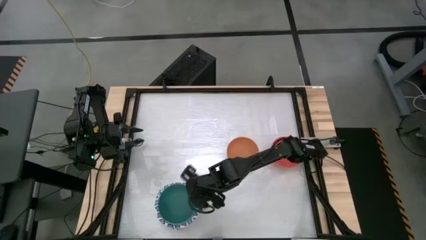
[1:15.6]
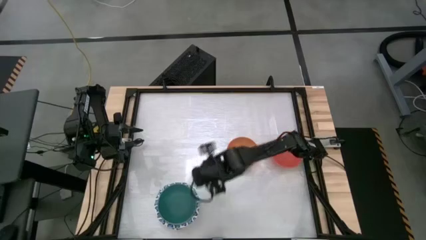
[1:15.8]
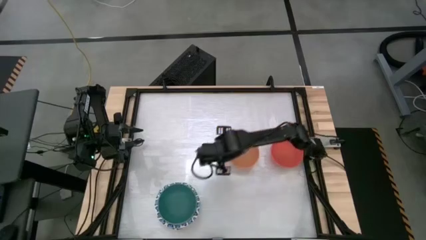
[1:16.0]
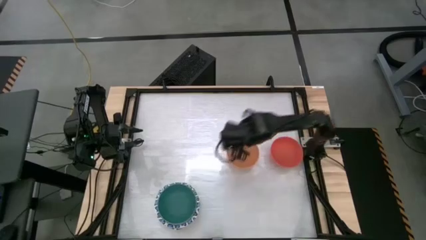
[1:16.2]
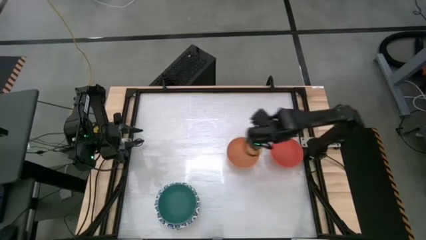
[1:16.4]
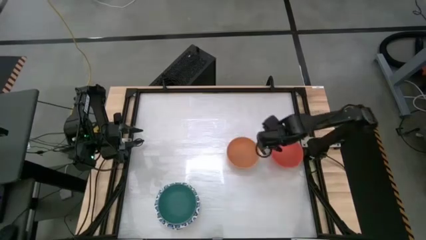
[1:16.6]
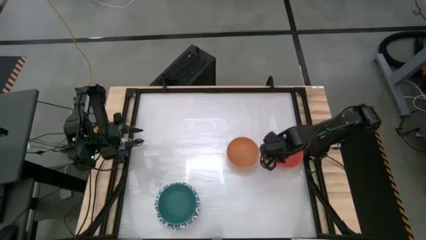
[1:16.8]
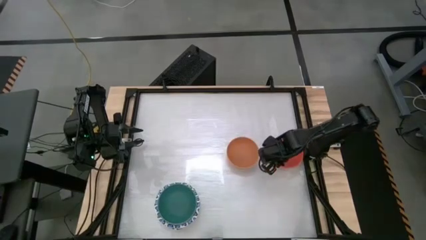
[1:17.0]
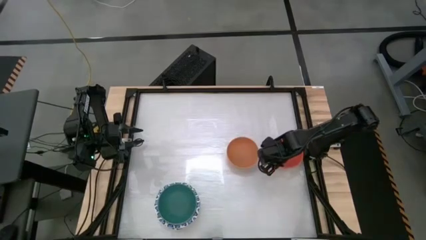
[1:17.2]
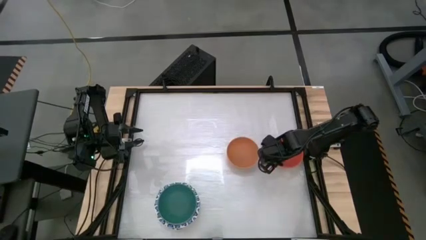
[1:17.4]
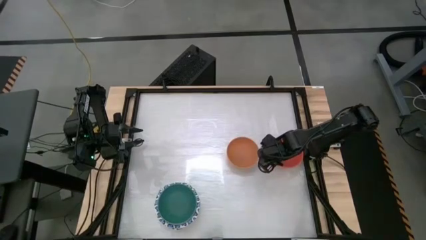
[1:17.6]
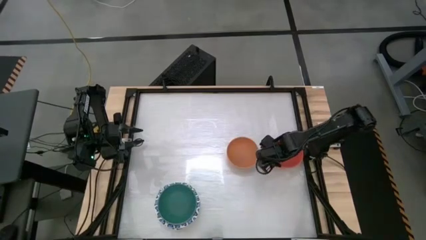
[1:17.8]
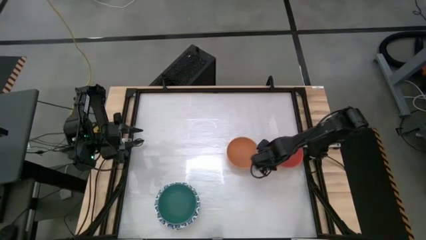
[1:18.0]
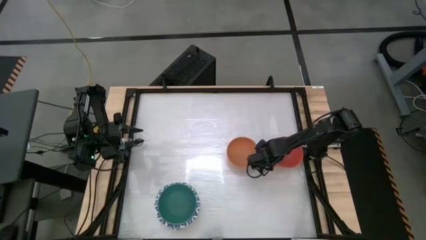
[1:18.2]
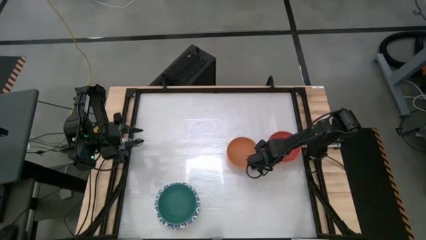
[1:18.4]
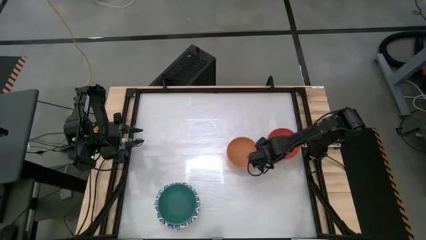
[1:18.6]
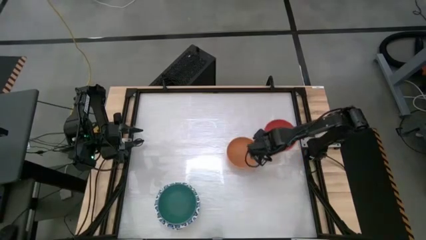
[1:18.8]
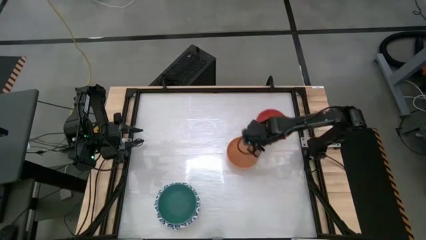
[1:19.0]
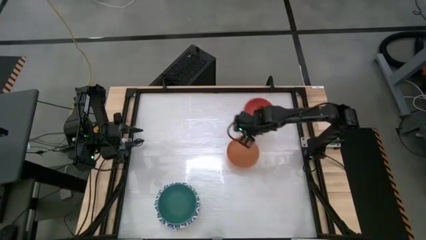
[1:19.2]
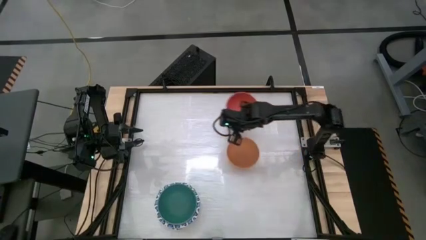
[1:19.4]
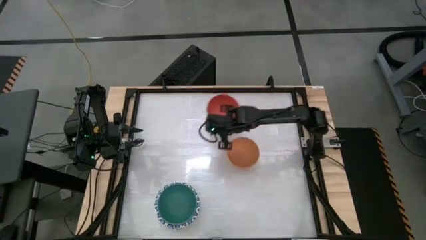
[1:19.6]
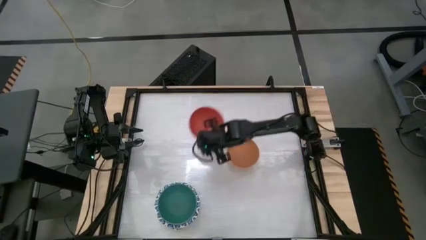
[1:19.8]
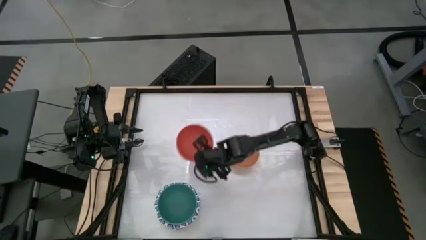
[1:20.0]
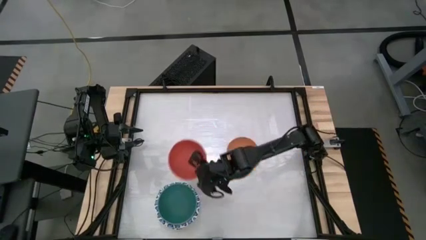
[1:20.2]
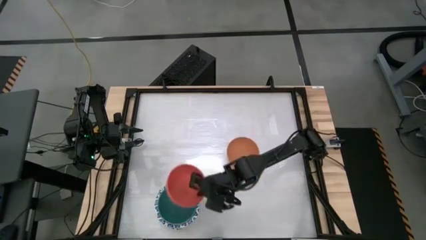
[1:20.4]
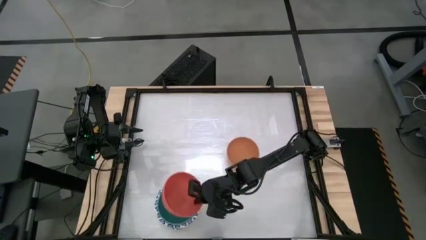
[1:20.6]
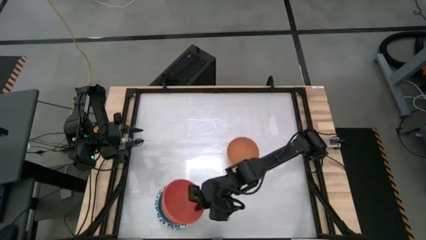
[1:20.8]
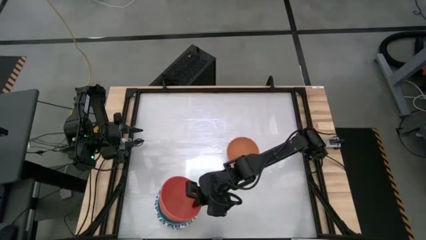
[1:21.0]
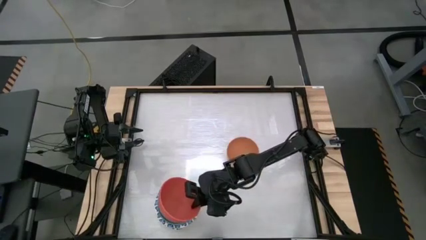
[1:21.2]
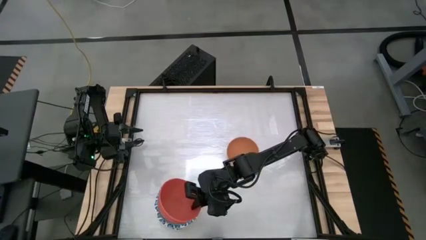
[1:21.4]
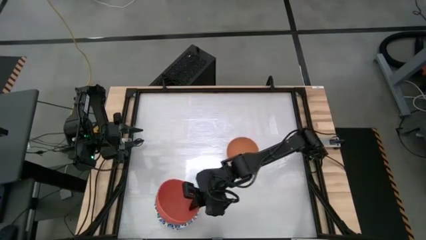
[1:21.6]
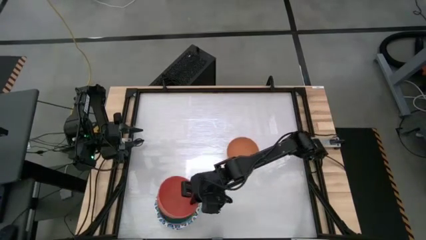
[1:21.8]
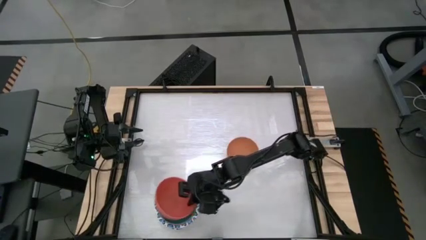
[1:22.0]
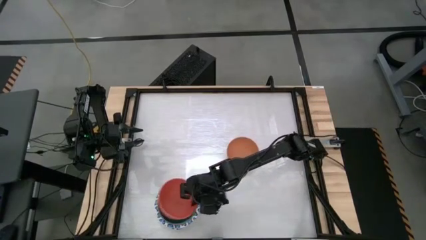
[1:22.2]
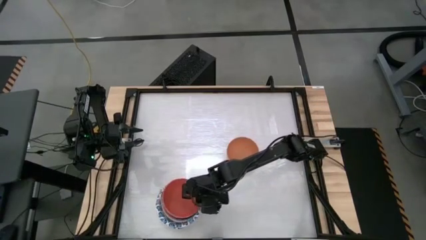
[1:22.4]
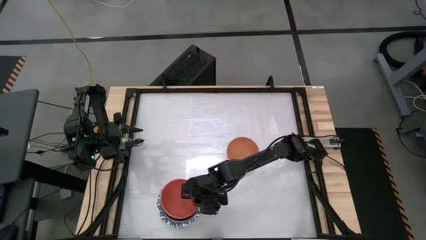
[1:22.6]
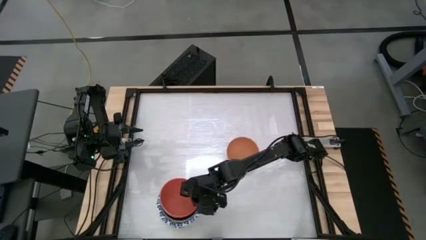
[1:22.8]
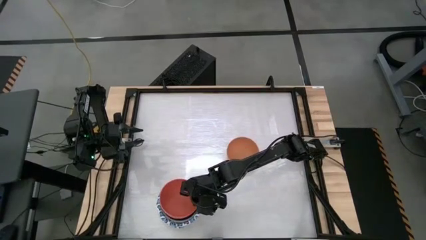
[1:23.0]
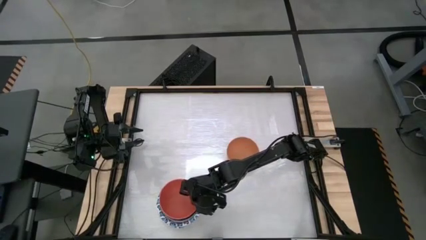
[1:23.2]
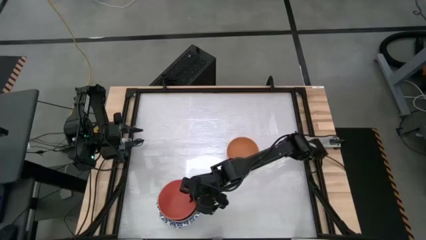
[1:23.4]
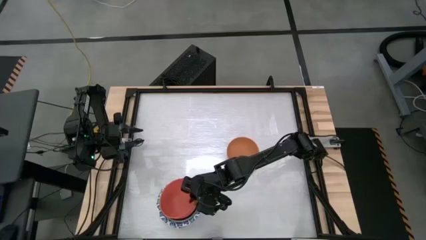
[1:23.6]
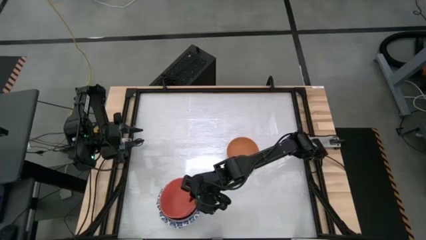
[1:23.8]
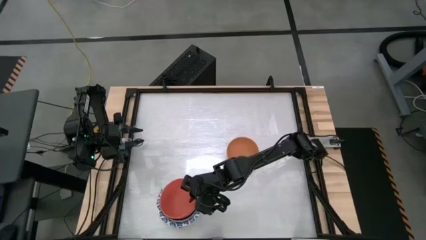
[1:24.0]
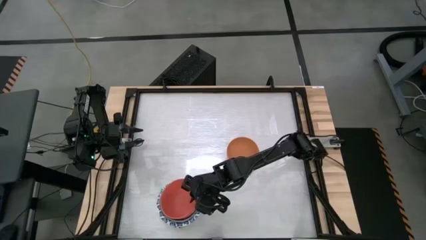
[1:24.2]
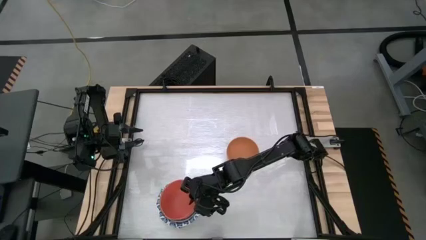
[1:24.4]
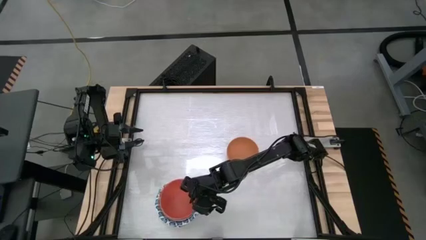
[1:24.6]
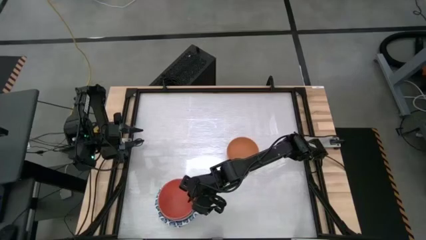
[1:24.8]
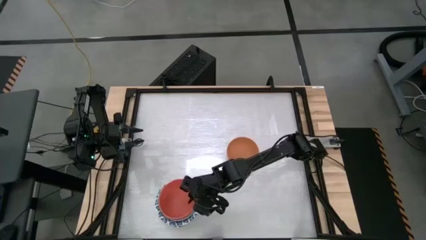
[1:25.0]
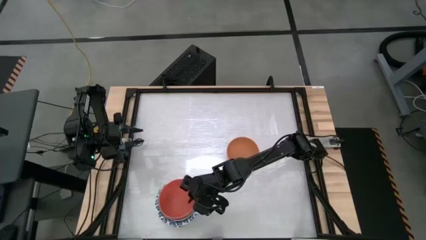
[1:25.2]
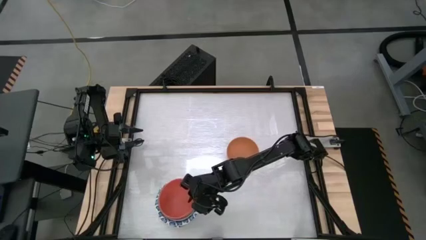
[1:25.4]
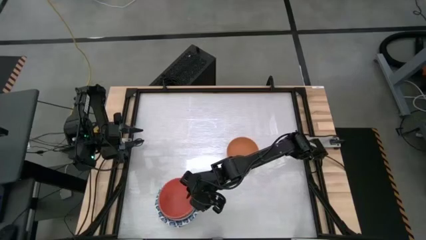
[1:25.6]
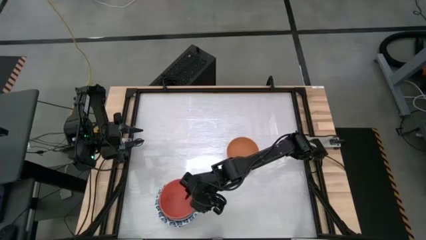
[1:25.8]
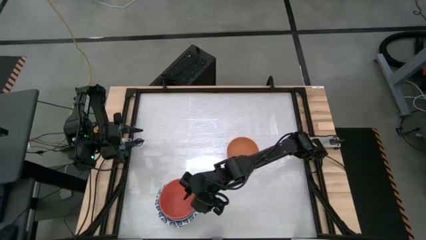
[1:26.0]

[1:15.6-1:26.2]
Stack the orange bowl on top of the other green bowl

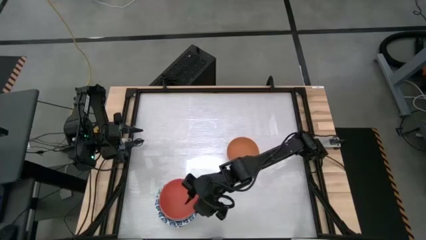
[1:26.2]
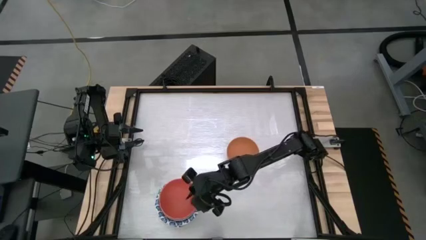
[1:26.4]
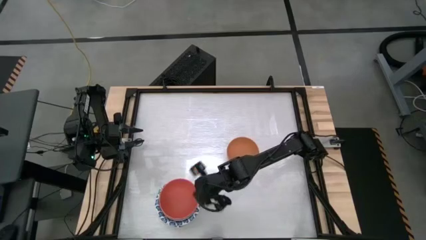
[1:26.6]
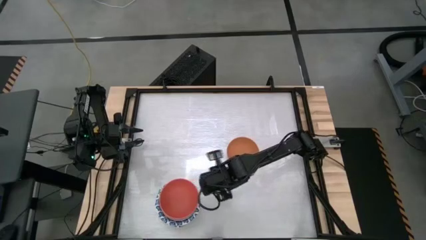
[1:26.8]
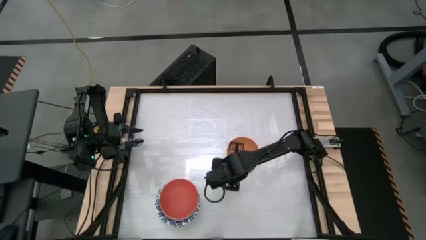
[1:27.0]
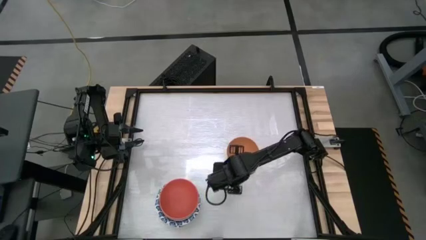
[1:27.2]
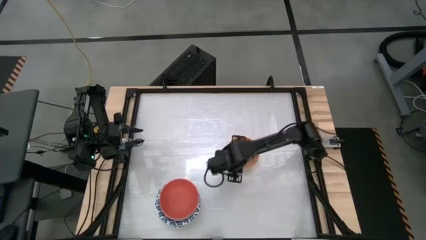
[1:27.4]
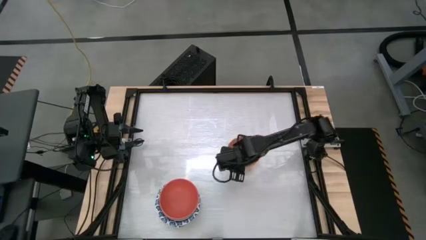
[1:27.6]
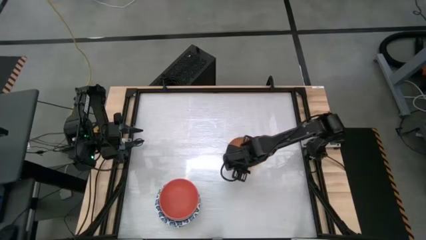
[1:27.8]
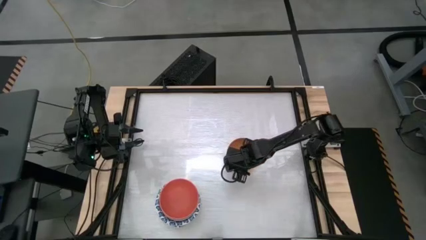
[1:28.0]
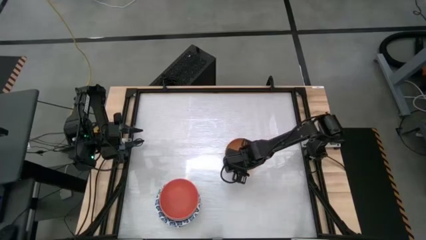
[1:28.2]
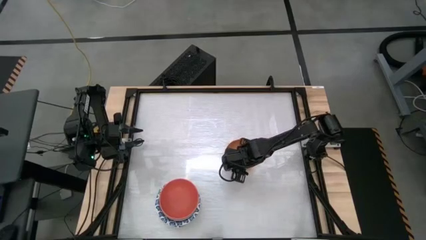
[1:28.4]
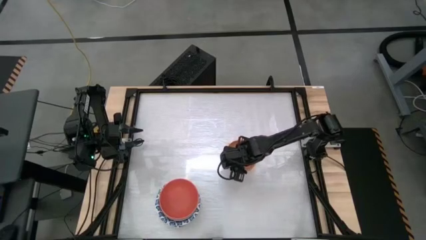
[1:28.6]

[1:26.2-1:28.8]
Stack the light orange bowl on top of the other orange bowl
